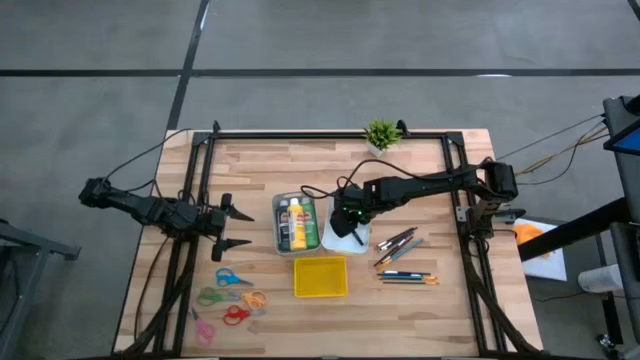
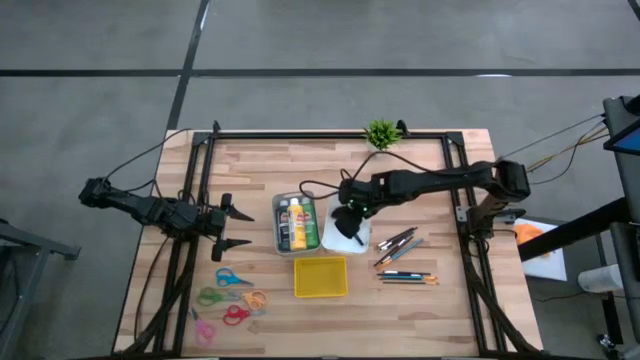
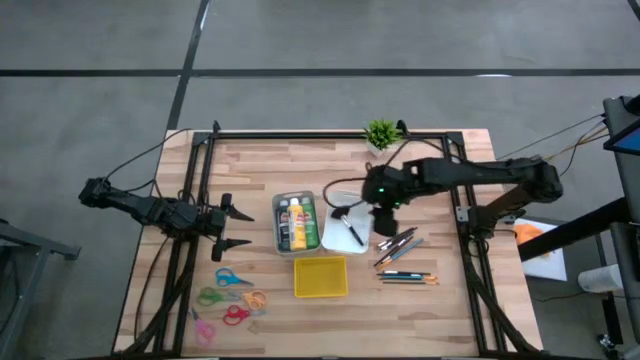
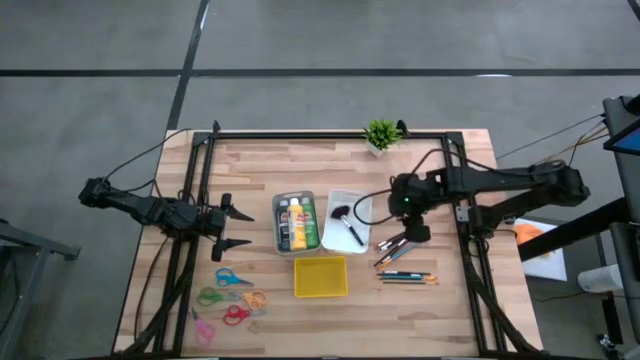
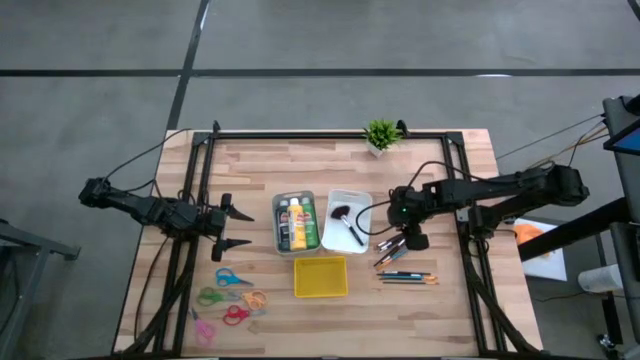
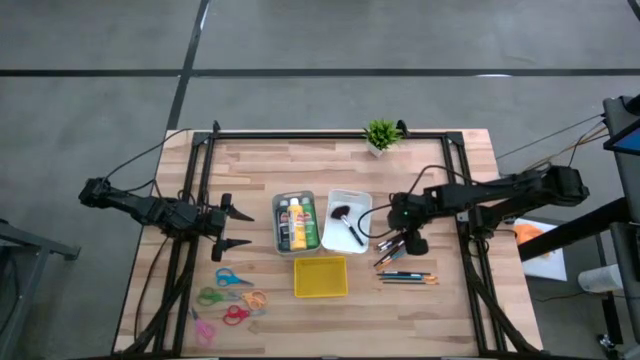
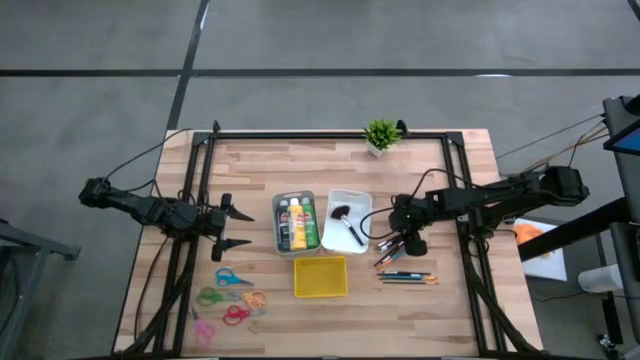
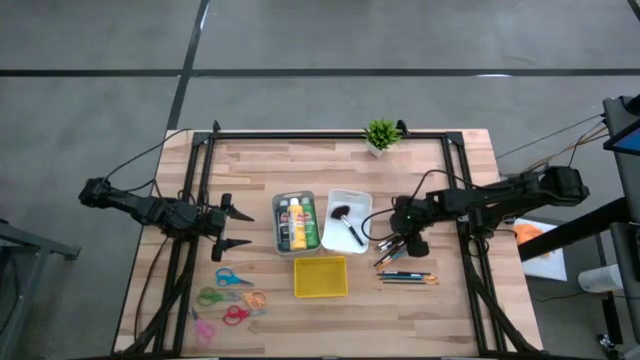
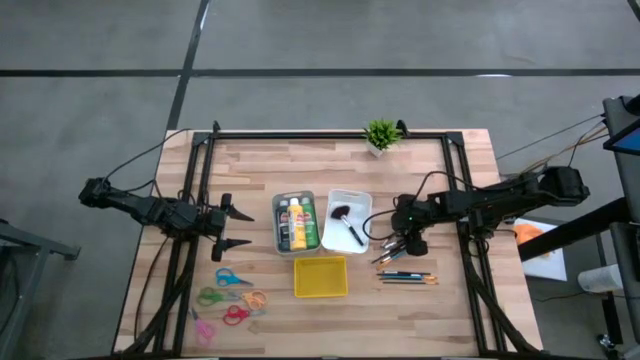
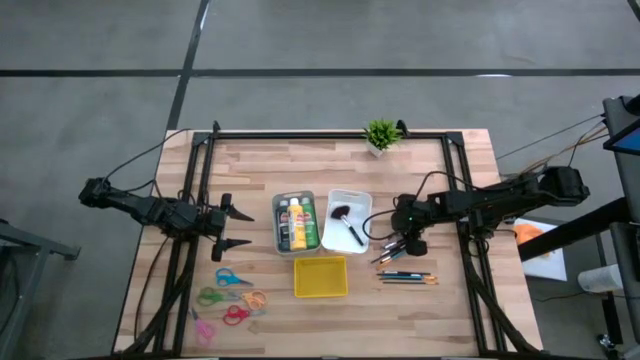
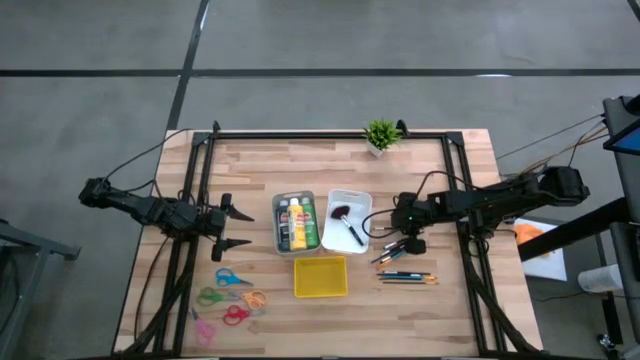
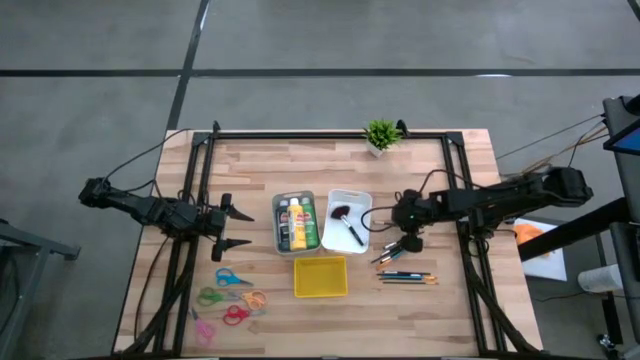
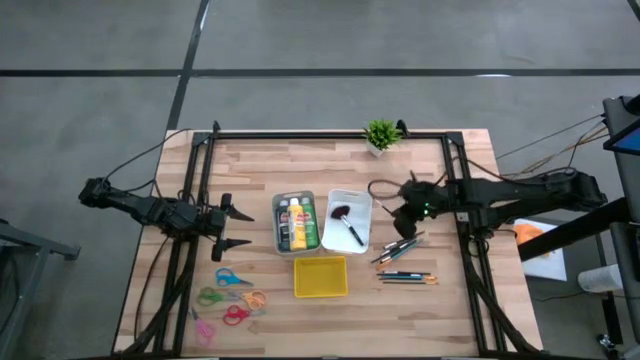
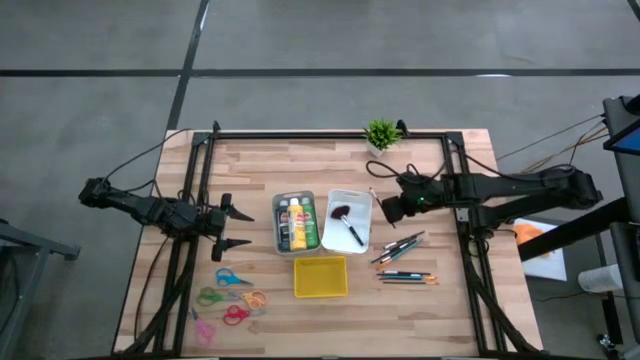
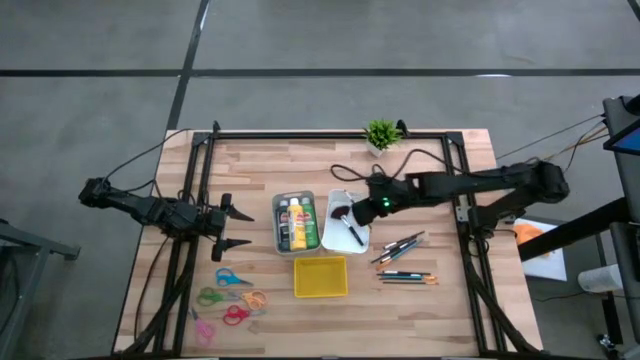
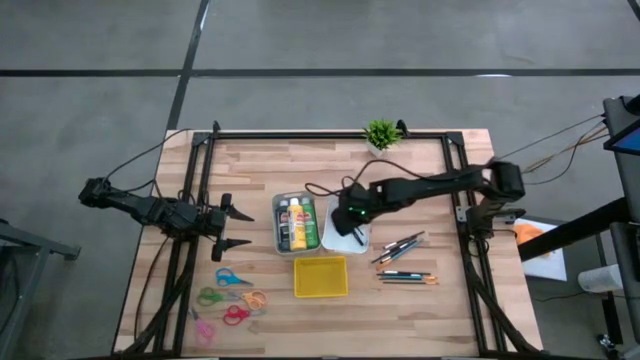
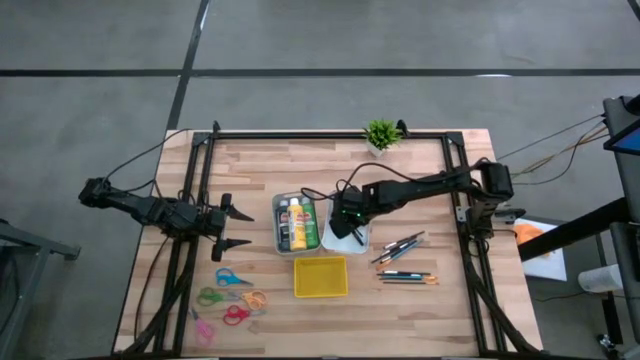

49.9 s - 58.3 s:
Task: Pick & Place Paint Supplies
Put the silver paint brush into the white bin

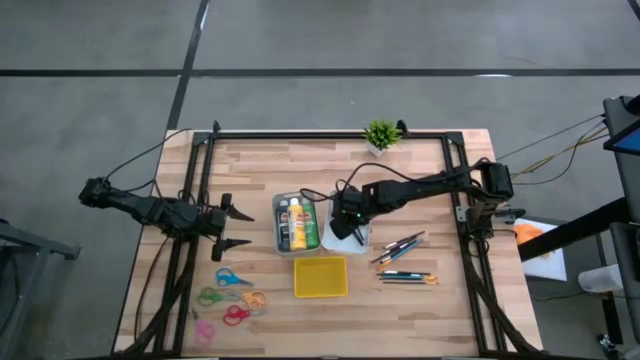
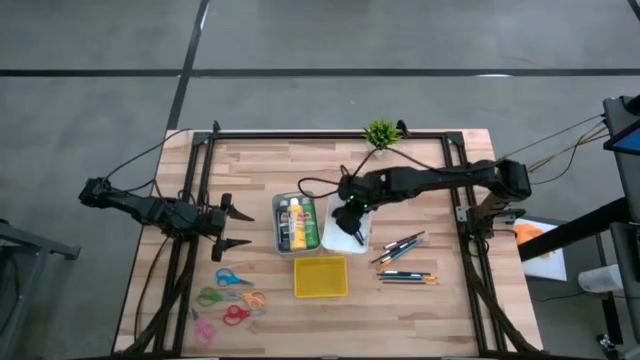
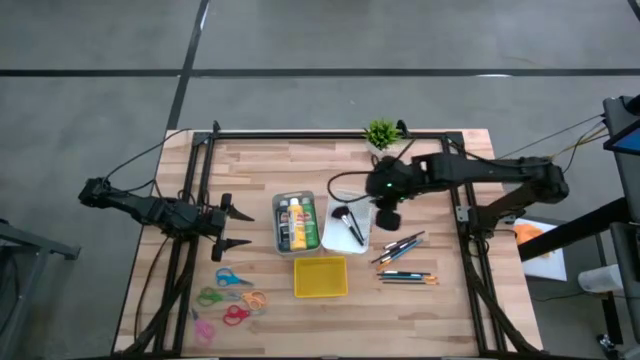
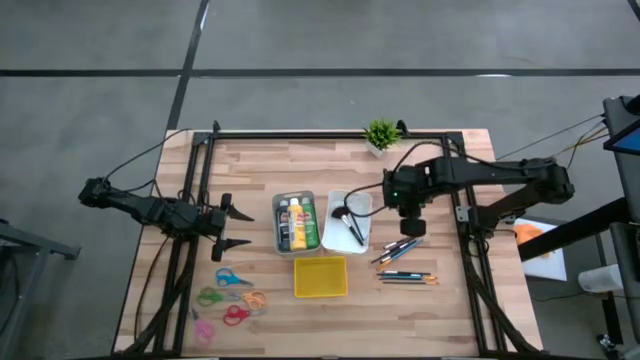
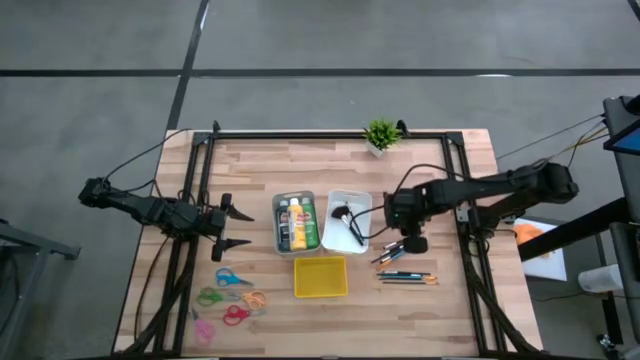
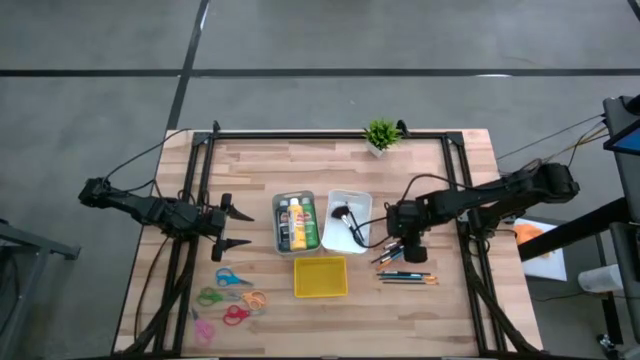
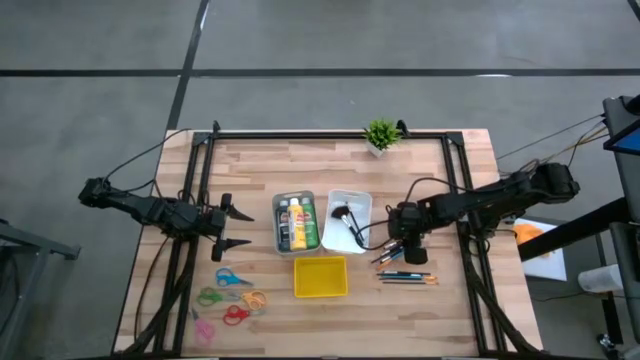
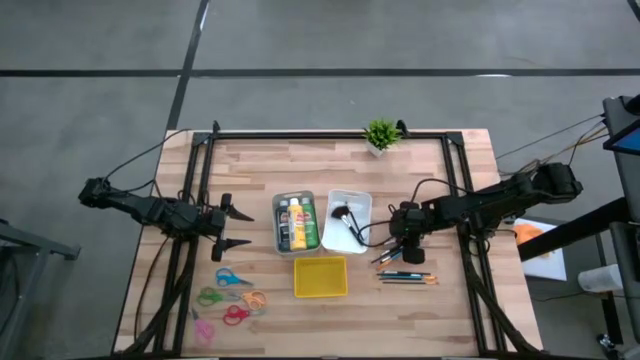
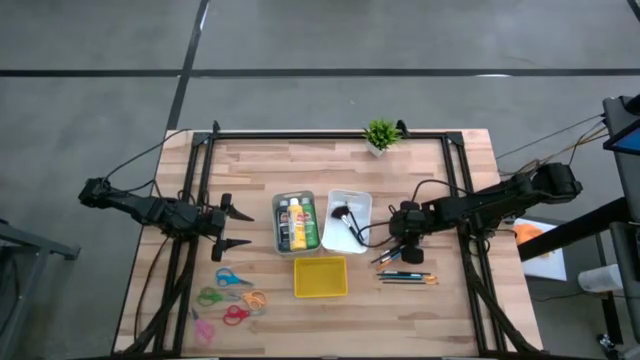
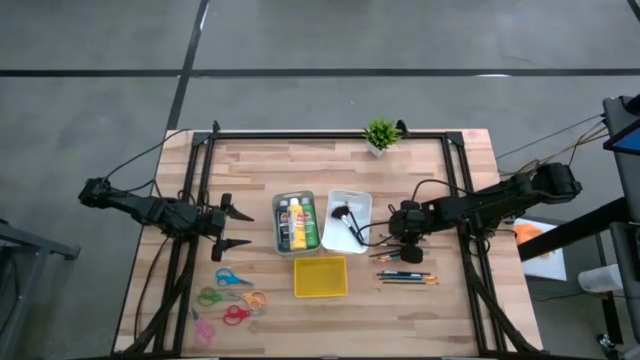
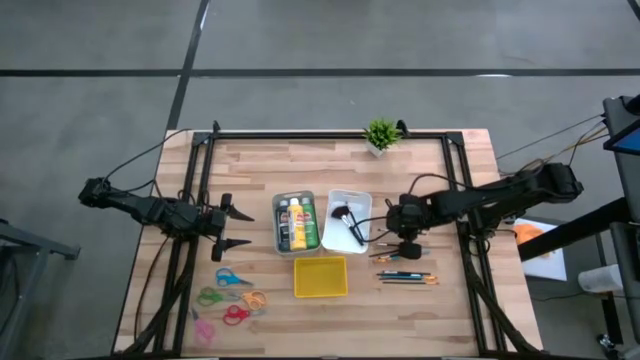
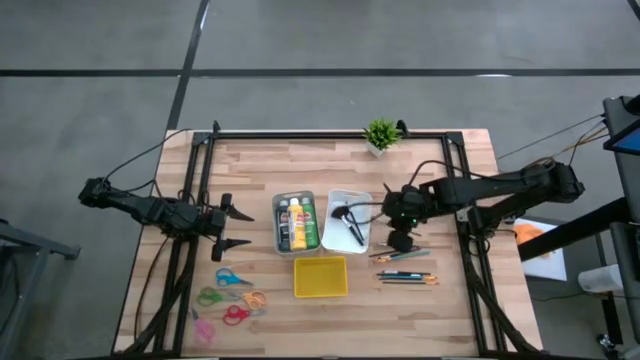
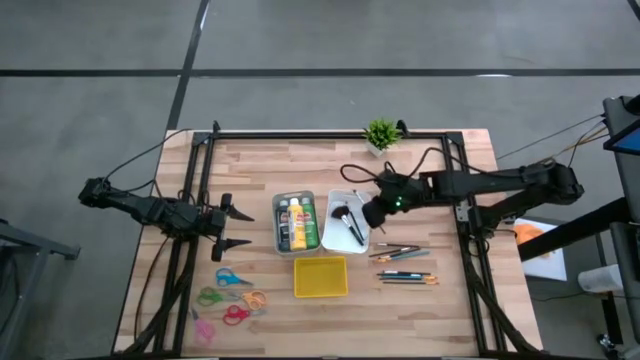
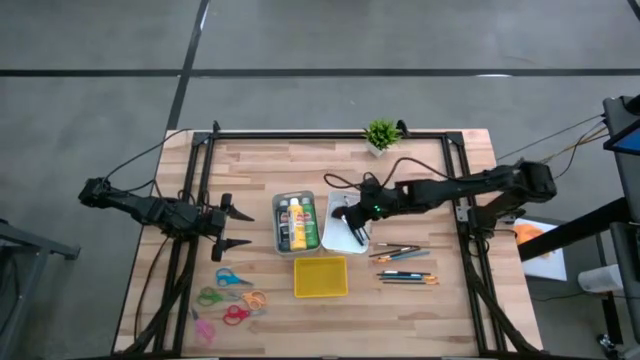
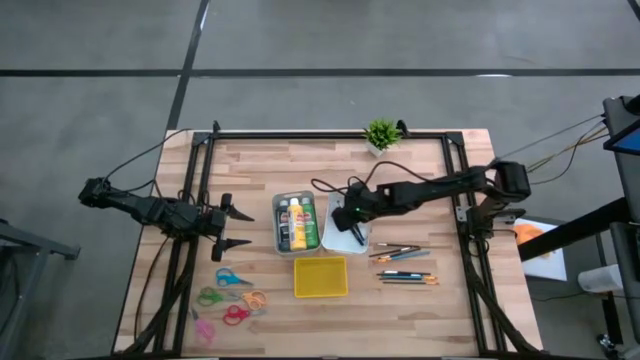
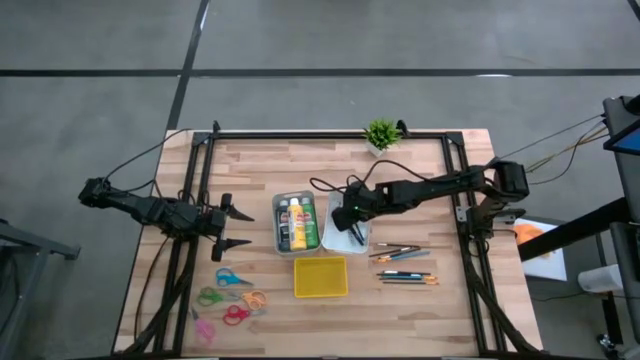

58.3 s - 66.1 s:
Put the silver paint brush into the white bin

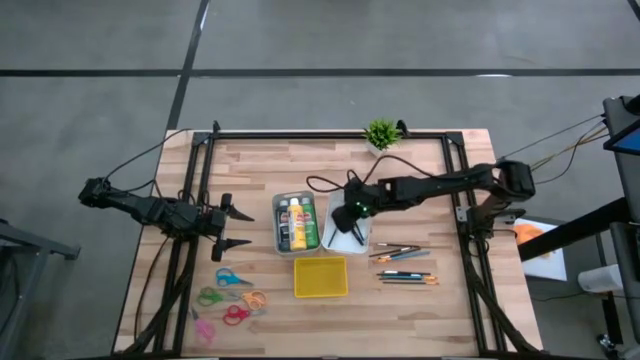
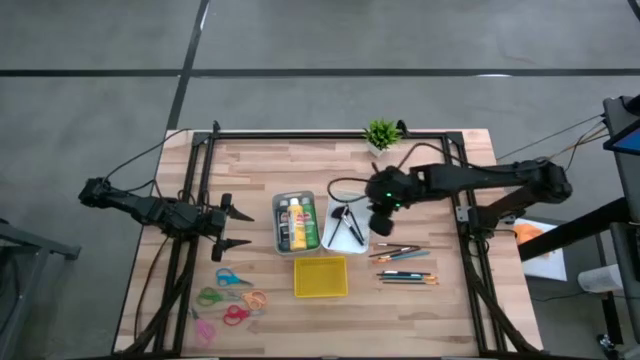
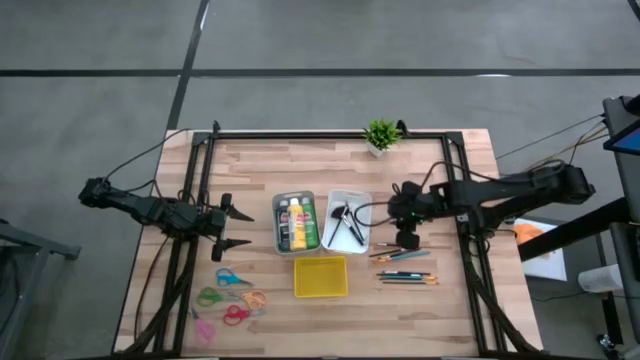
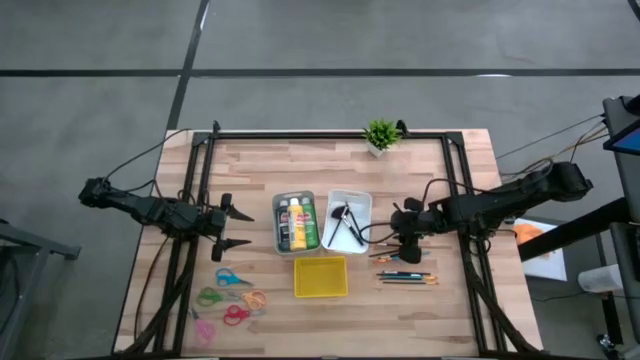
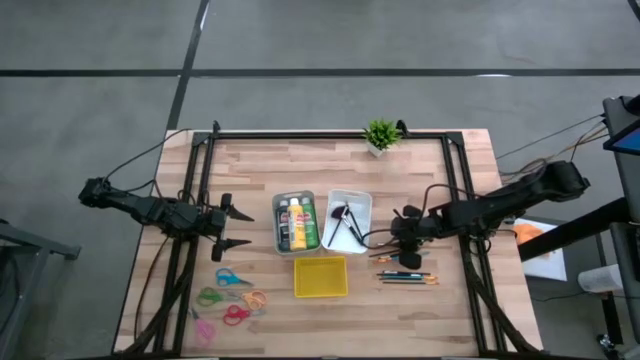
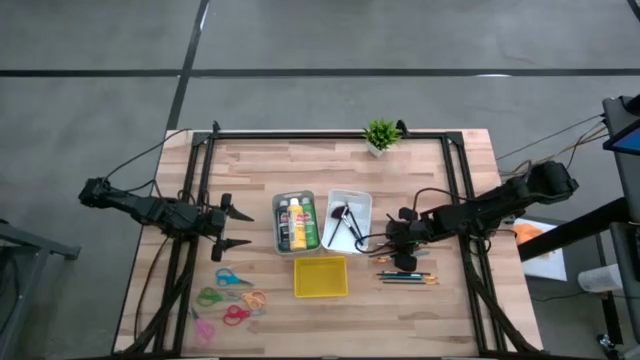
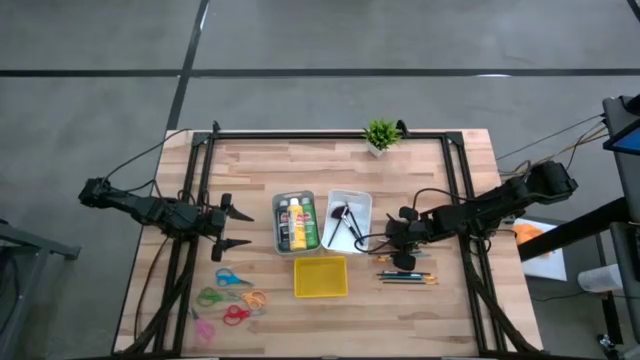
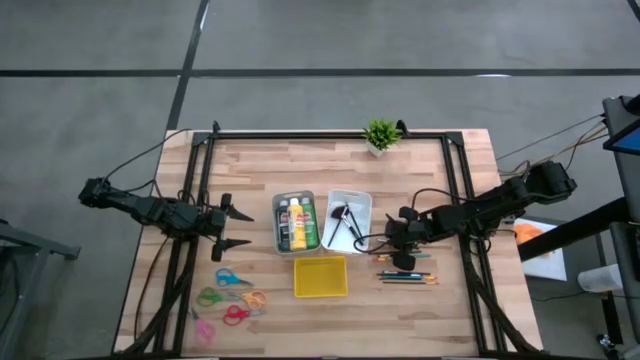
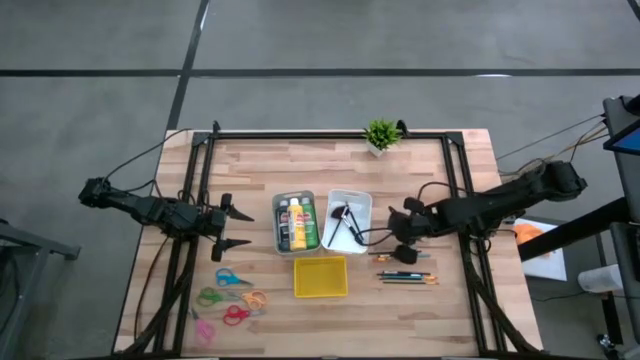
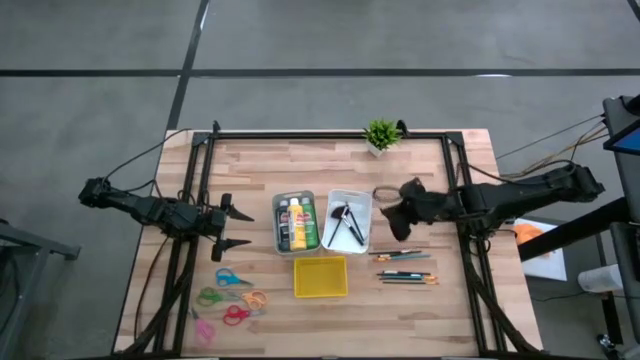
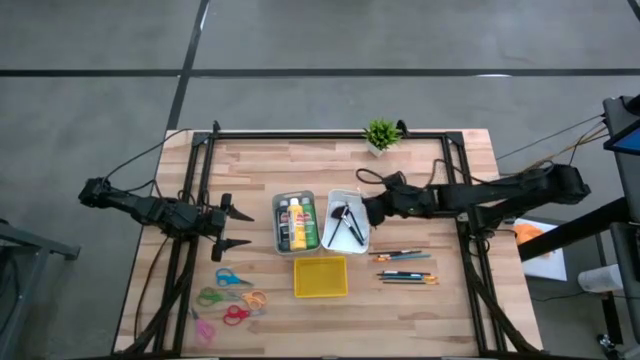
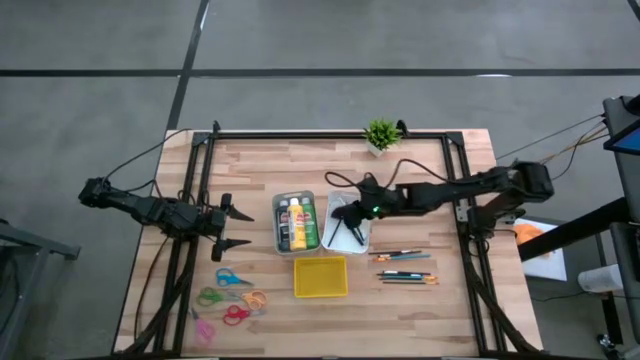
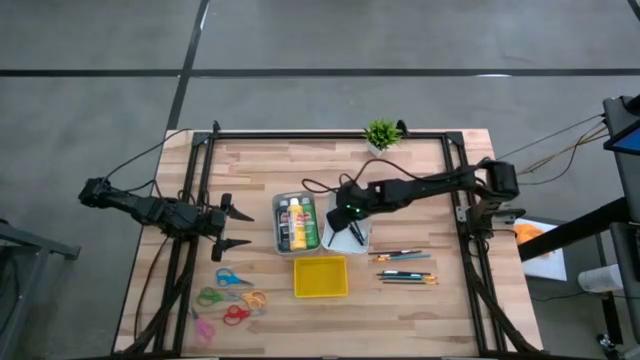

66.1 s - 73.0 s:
Put the silver paint brush into the white bin
